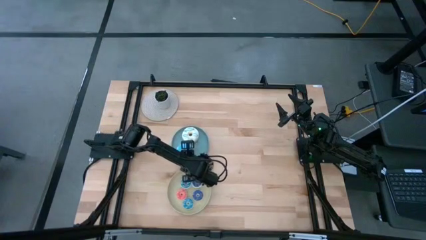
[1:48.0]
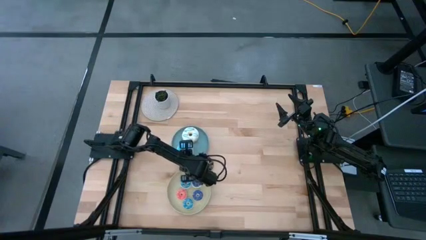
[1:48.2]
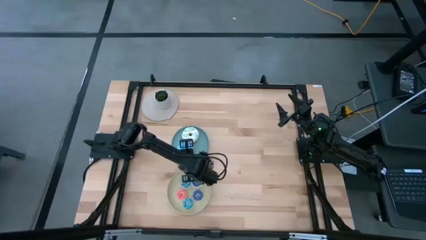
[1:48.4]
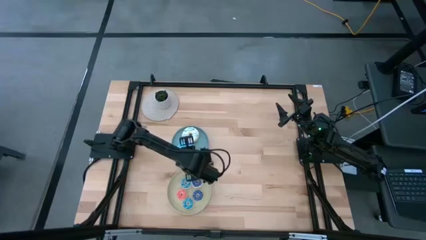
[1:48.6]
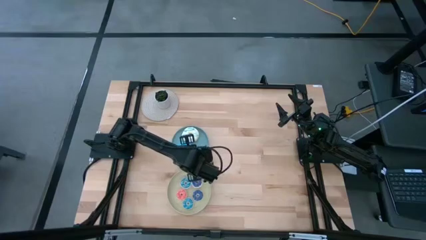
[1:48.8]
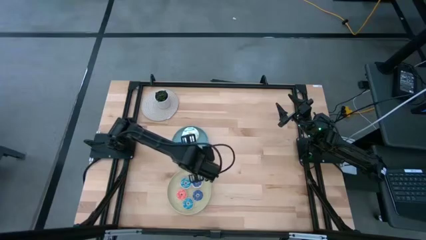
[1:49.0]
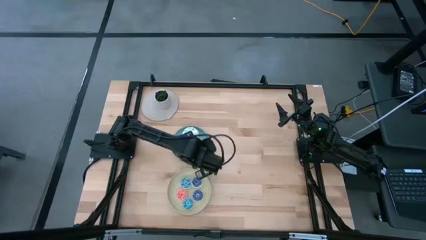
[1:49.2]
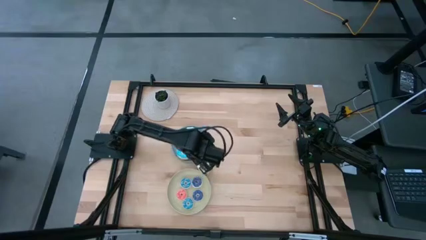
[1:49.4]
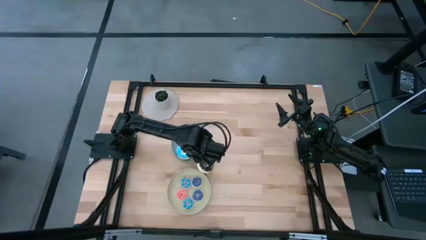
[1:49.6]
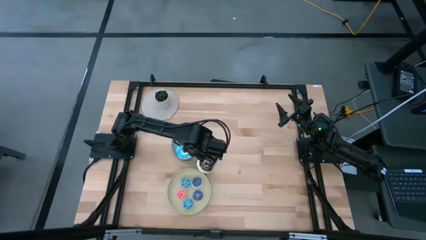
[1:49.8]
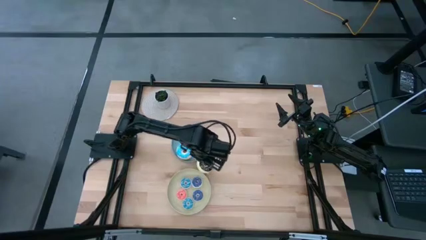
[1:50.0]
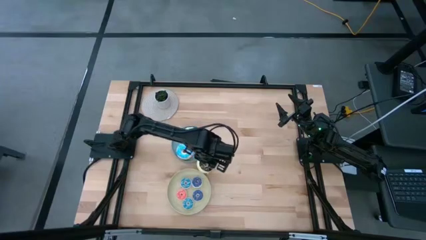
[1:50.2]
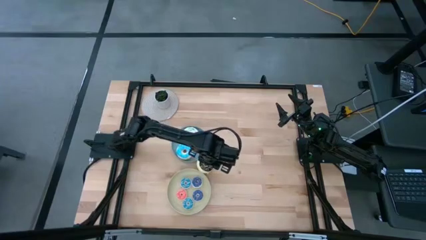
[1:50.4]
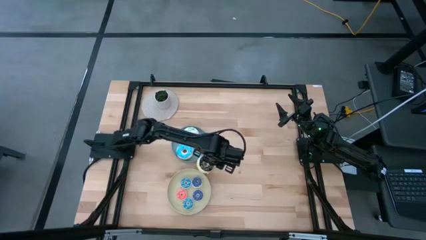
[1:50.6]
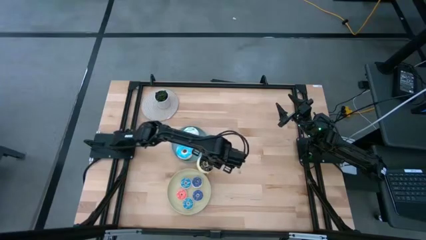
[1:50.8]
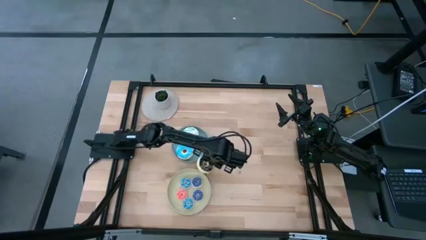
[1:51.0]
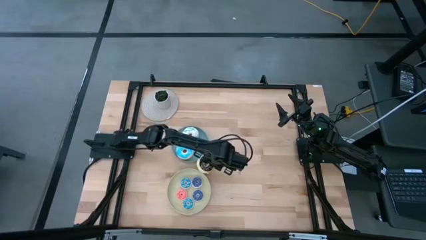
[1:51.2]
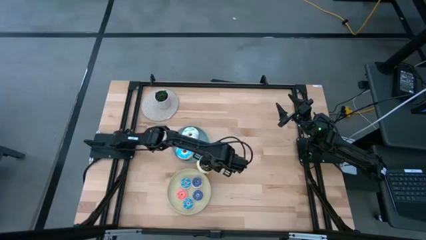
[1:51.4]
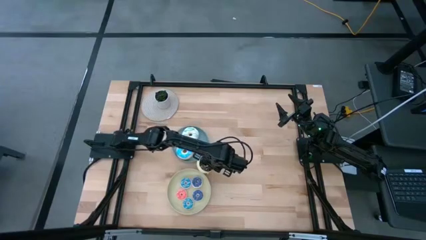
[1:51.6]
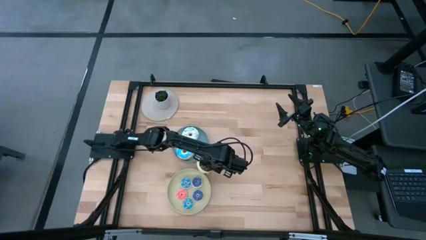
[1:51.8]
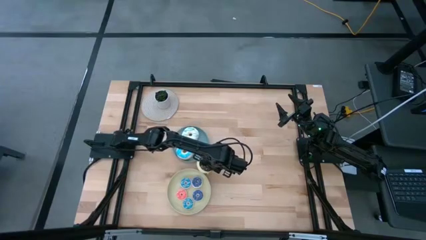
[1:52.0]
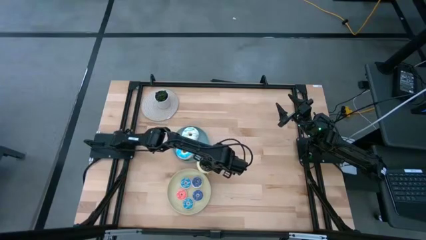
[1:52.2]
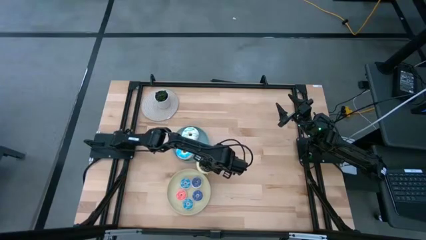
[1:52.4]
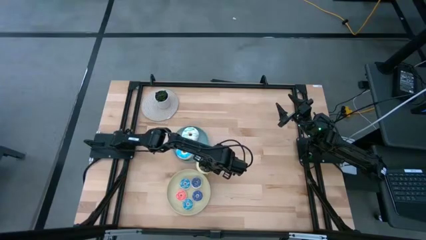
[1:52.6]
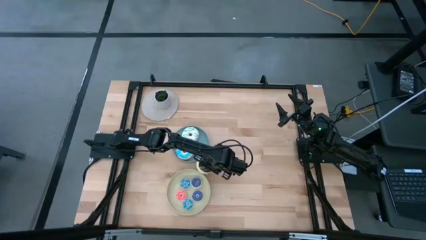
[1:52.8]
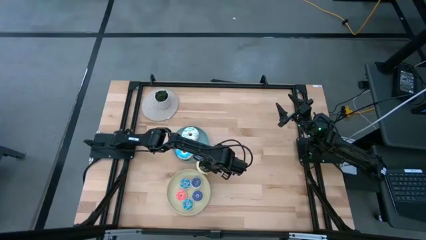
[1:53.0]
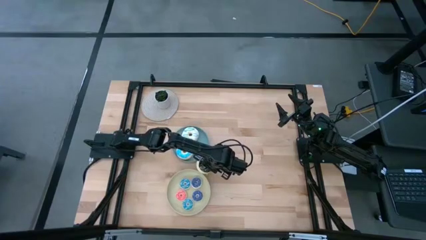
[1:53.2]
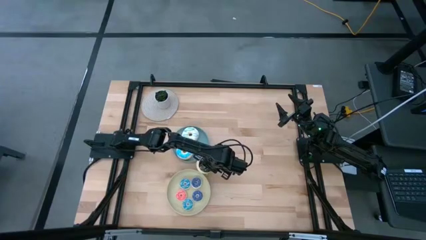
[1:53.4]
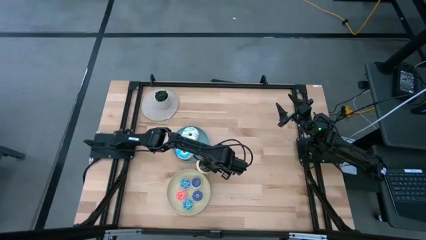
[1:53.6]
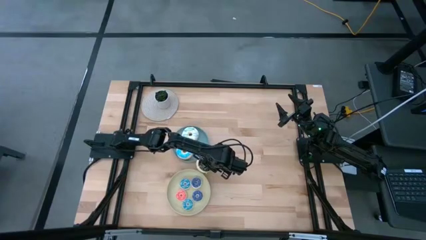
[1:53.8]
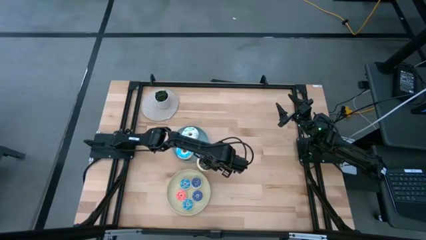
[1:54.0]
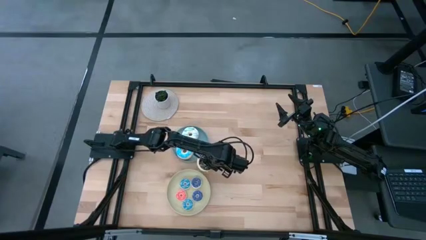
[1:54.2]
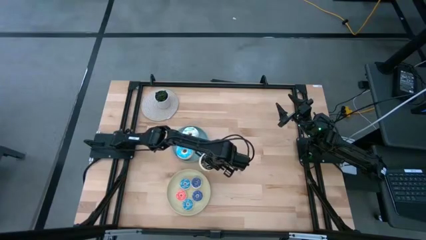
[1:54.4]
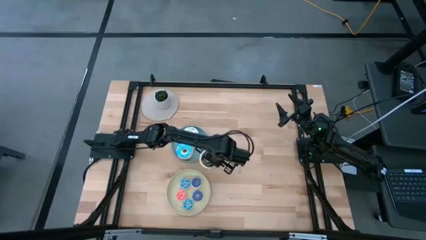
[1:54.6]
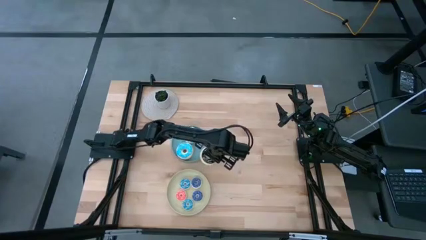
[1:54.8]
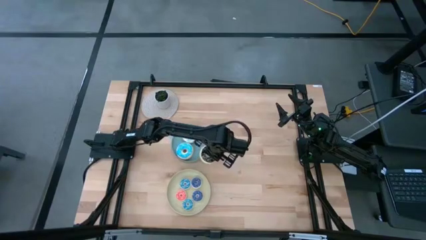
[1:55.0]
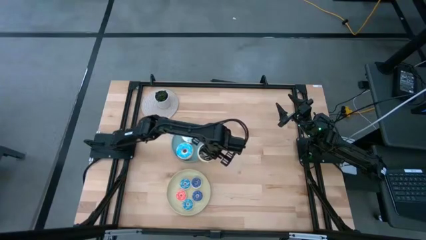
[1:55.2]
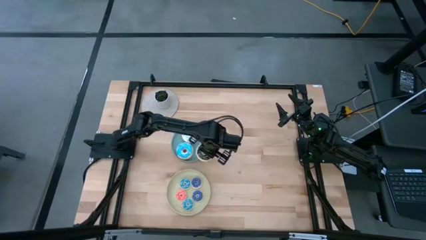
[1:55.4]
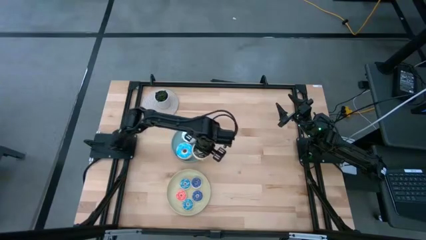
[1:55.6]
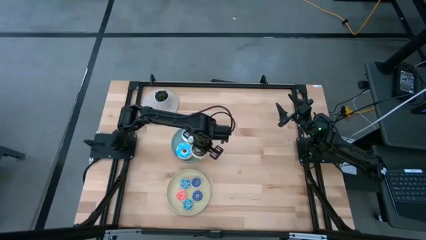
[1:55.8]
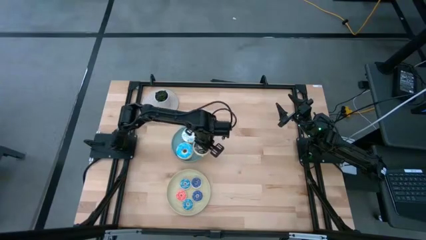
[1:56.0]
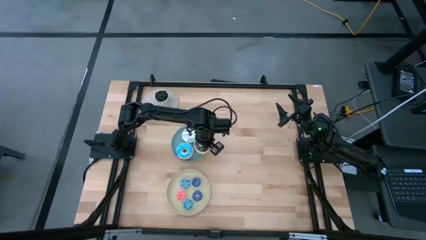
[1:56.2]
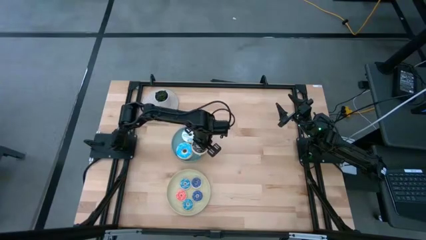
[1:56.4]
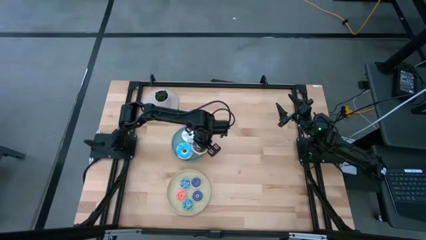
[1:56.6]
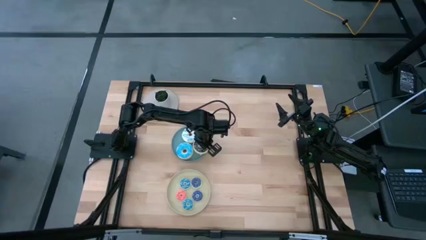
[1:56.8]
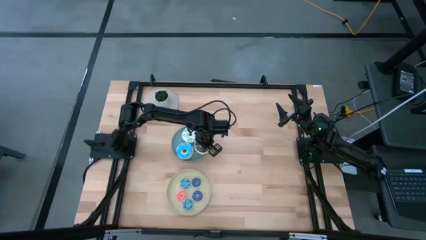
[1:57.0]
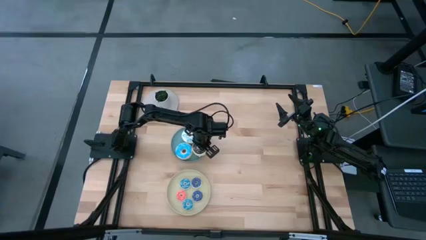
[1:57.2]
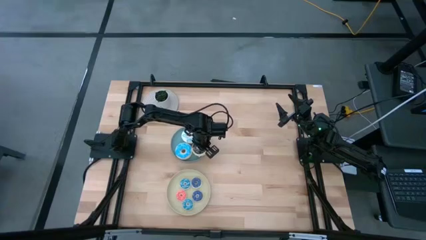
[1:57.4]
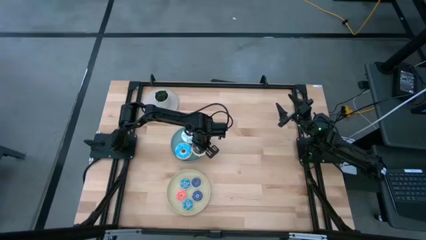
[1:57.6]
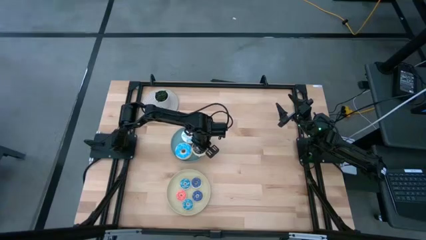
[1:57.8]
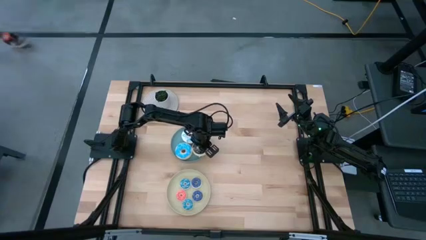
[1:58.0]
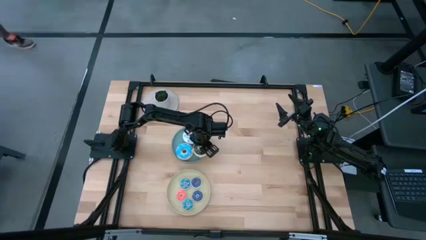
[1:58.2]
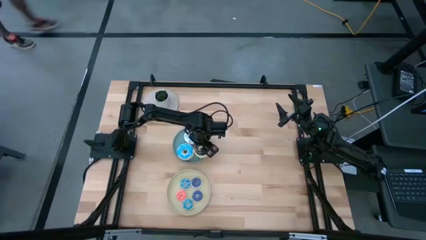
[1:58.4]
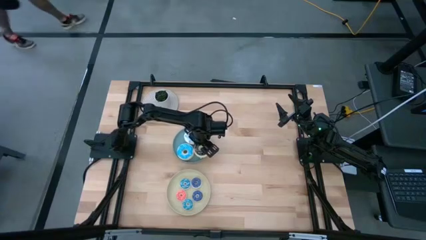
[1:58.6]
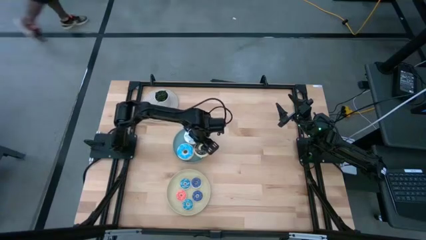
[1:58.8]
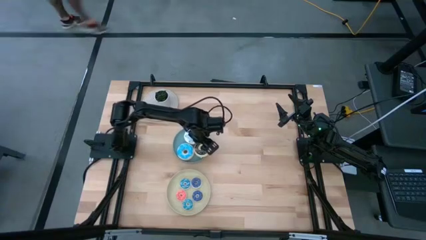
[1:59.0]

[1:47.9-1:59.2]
Task: Pick & Place donuts
Put the big black donut on the blue plate
